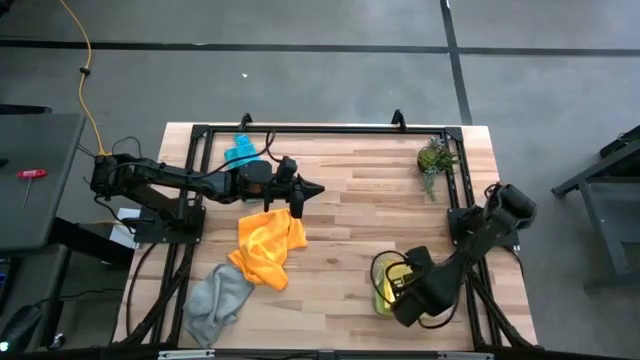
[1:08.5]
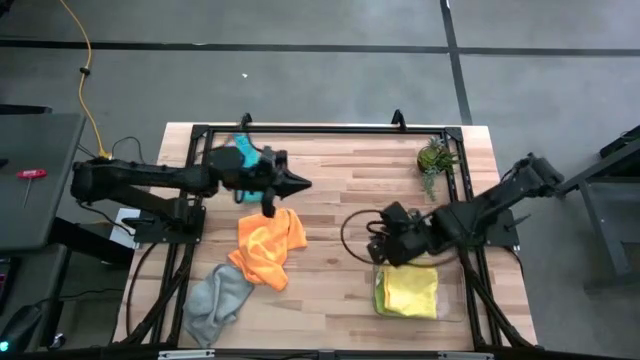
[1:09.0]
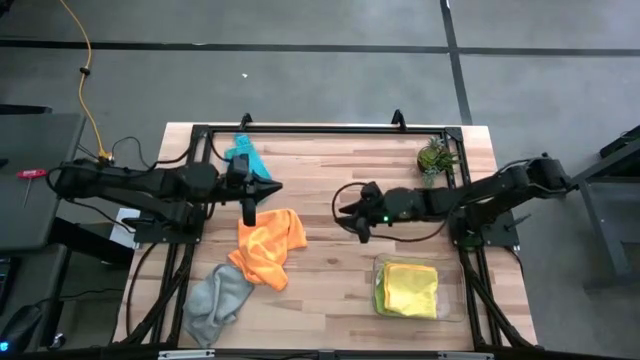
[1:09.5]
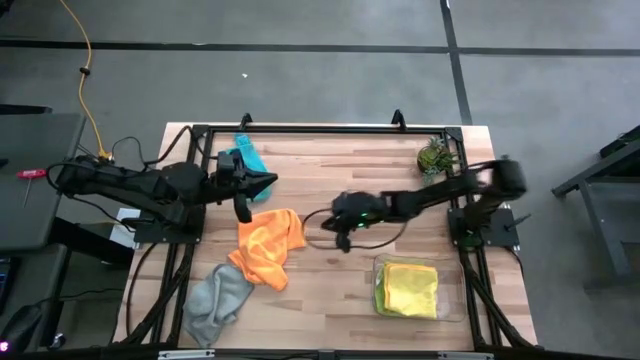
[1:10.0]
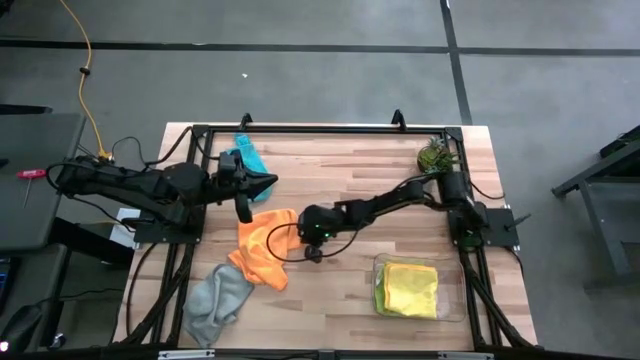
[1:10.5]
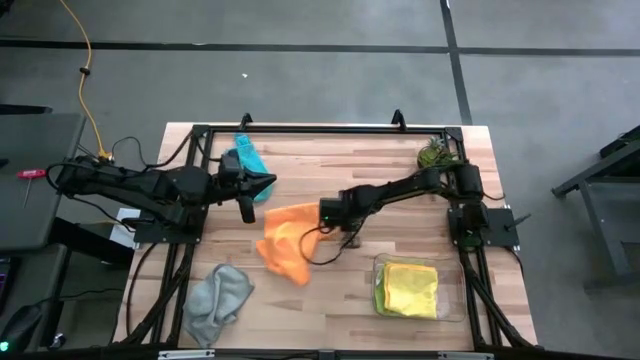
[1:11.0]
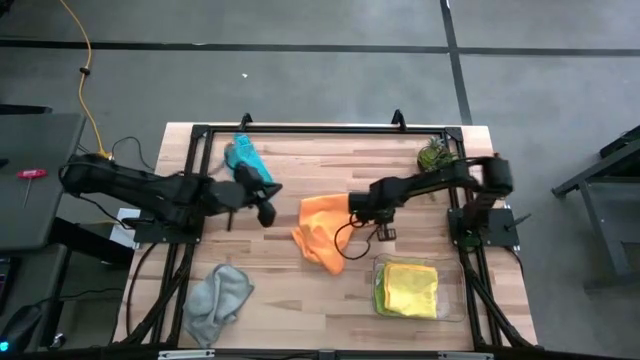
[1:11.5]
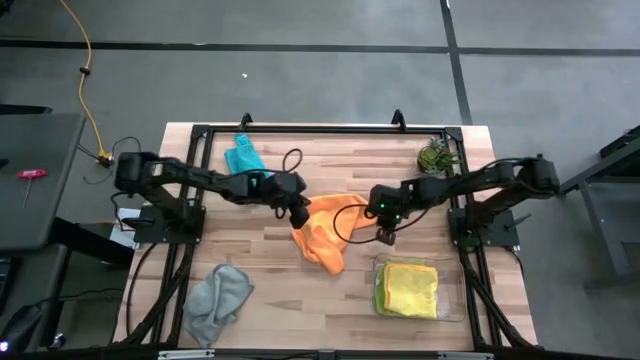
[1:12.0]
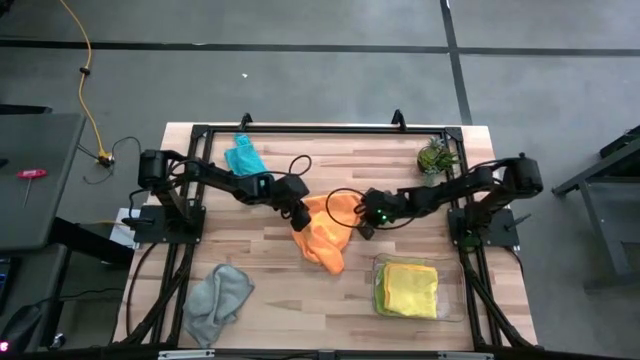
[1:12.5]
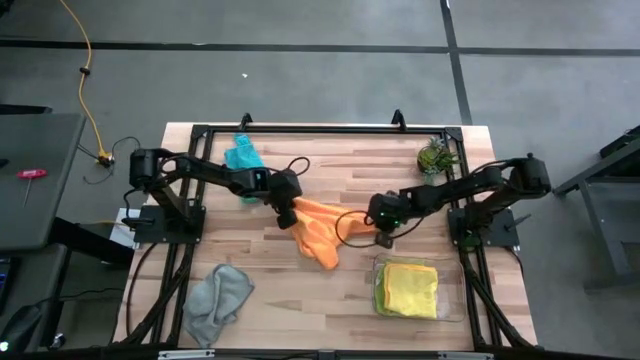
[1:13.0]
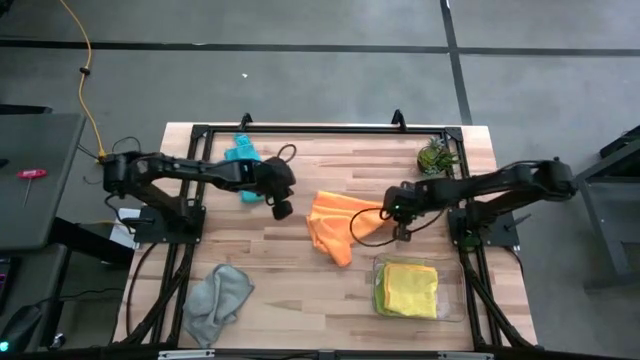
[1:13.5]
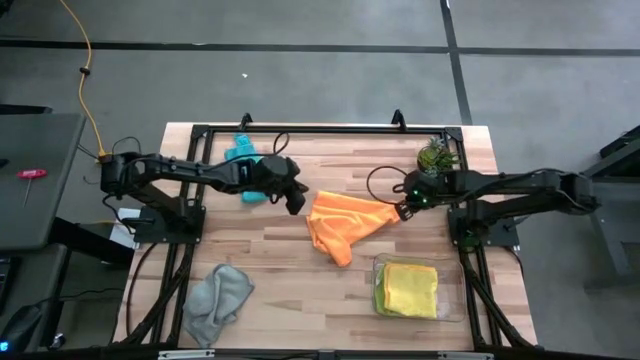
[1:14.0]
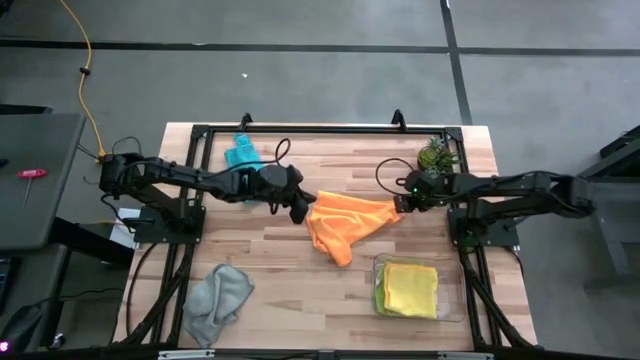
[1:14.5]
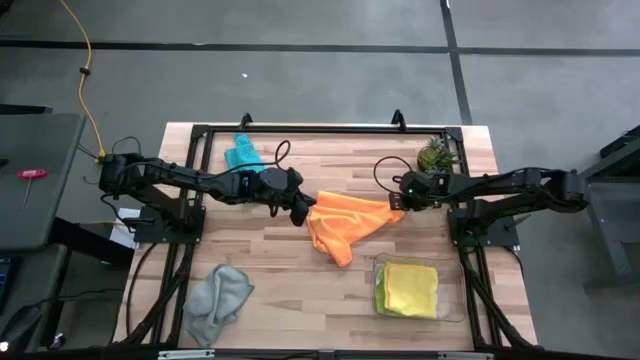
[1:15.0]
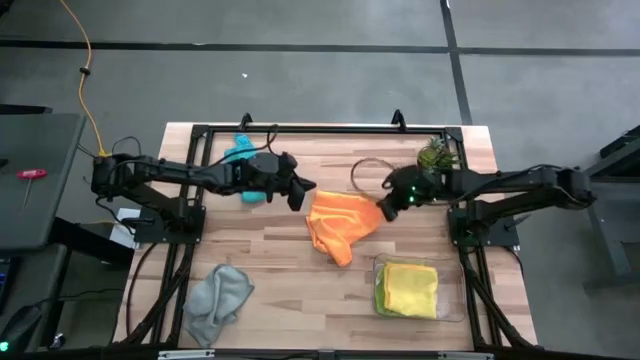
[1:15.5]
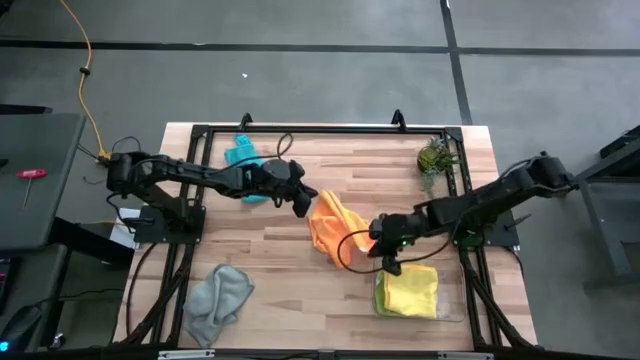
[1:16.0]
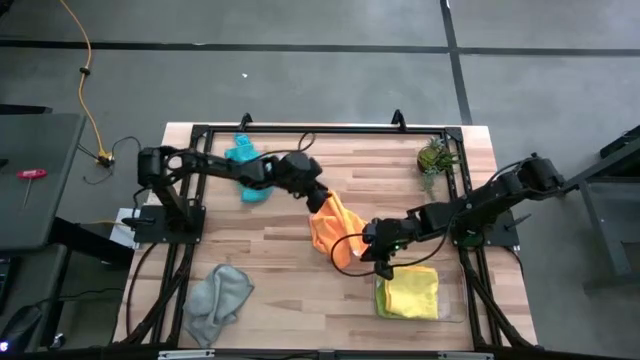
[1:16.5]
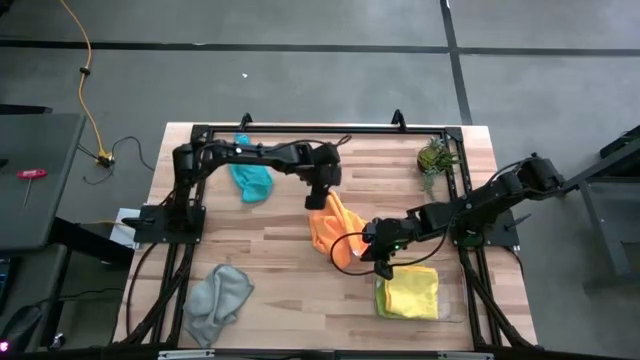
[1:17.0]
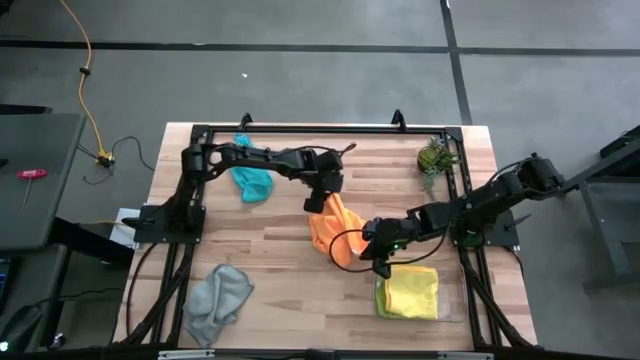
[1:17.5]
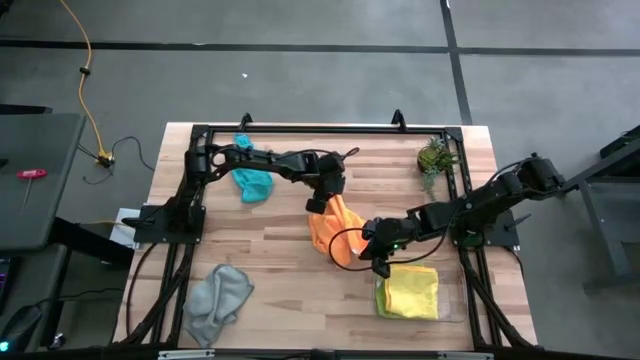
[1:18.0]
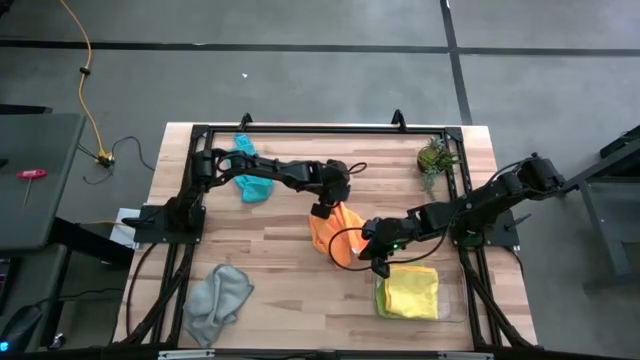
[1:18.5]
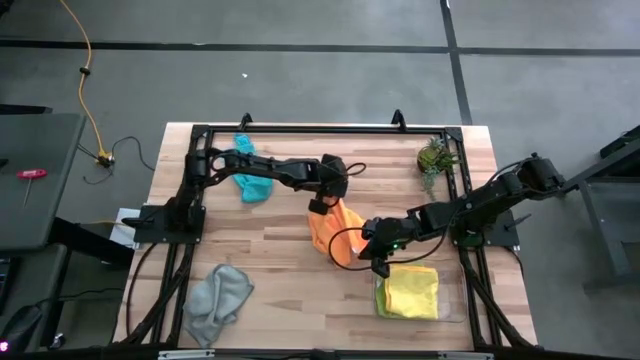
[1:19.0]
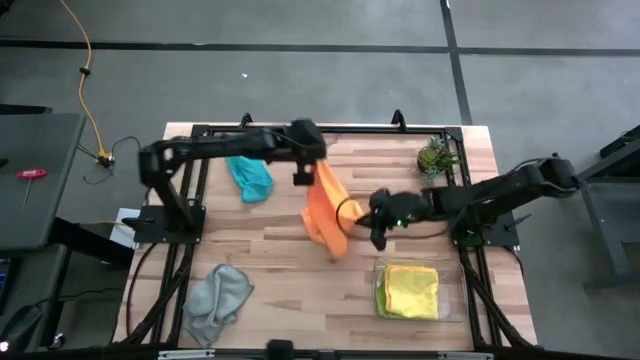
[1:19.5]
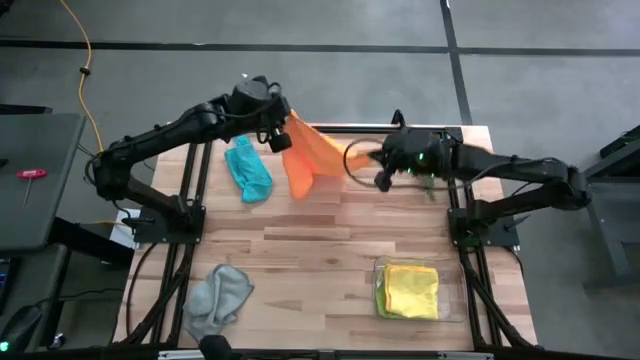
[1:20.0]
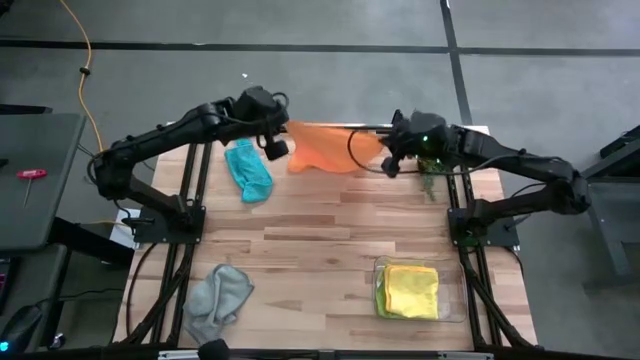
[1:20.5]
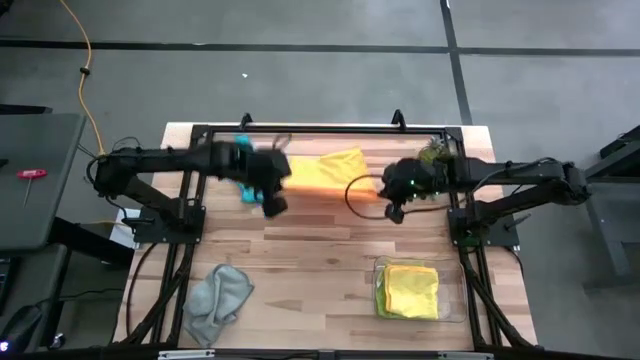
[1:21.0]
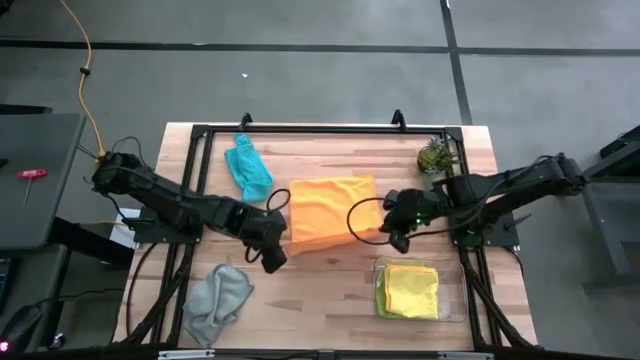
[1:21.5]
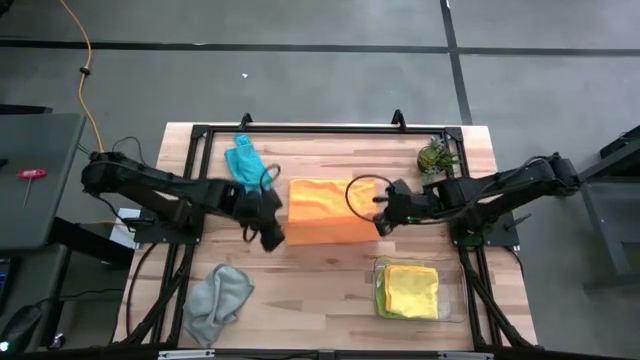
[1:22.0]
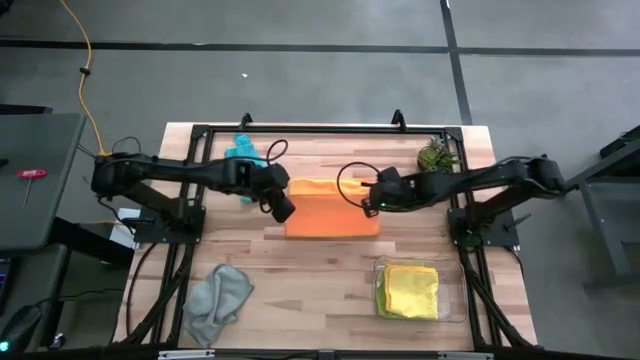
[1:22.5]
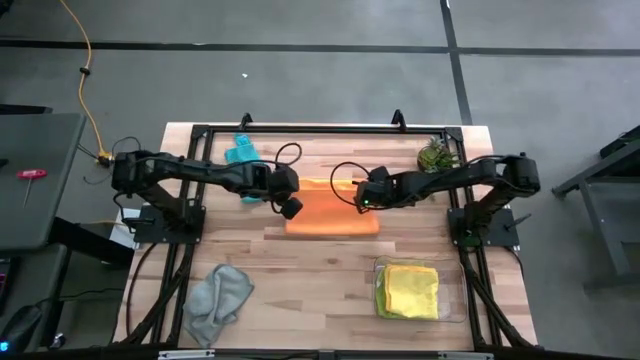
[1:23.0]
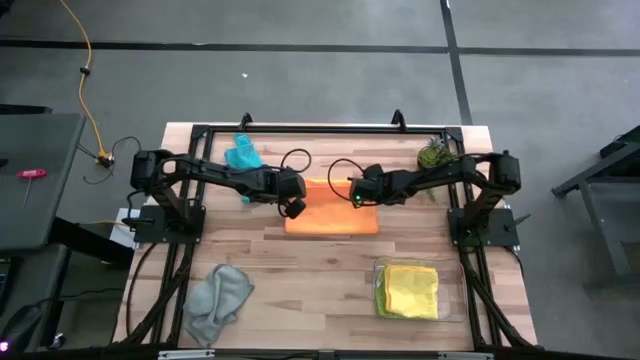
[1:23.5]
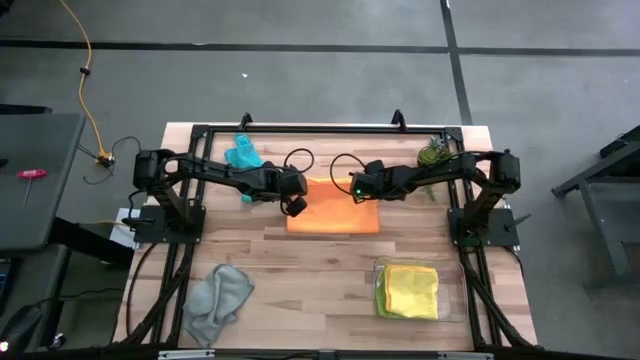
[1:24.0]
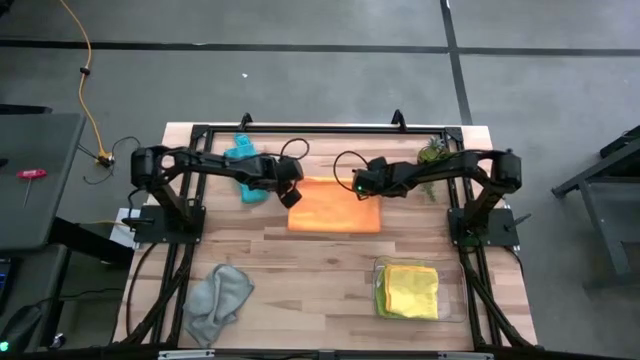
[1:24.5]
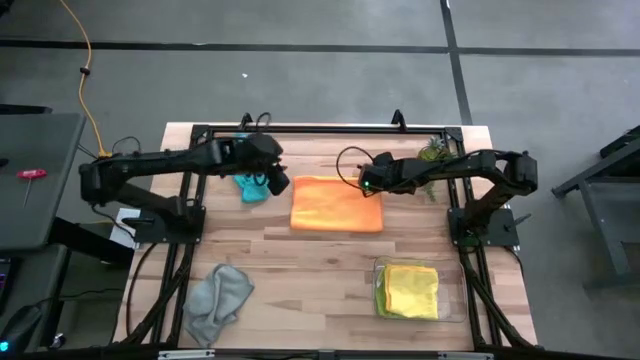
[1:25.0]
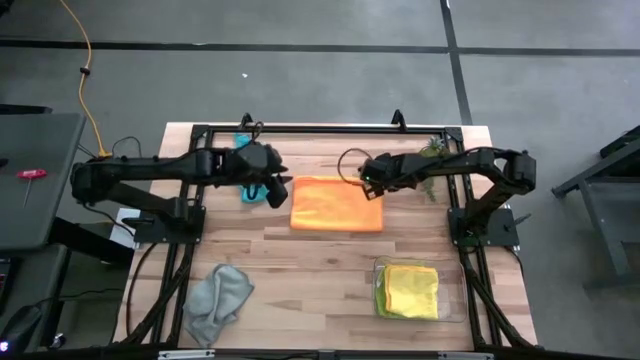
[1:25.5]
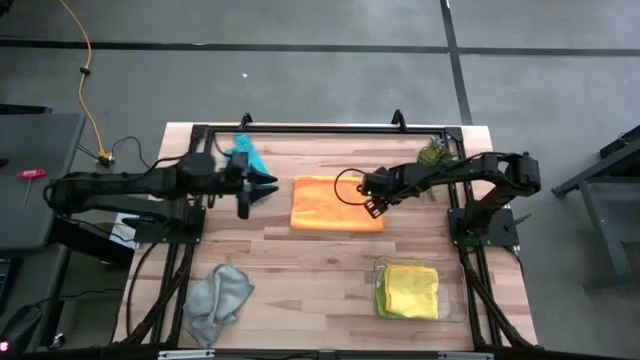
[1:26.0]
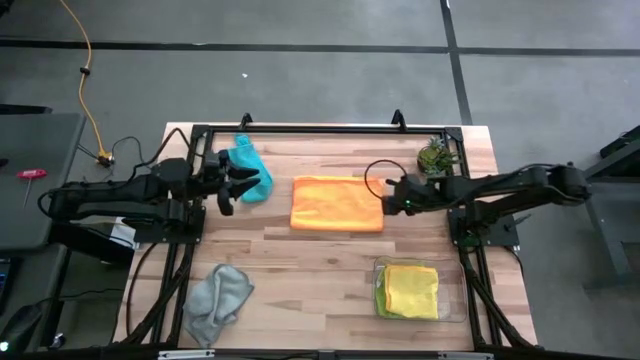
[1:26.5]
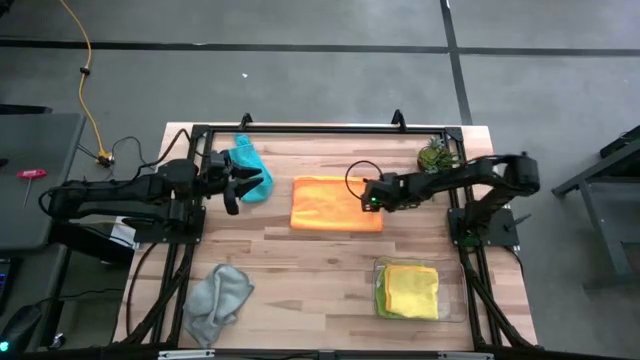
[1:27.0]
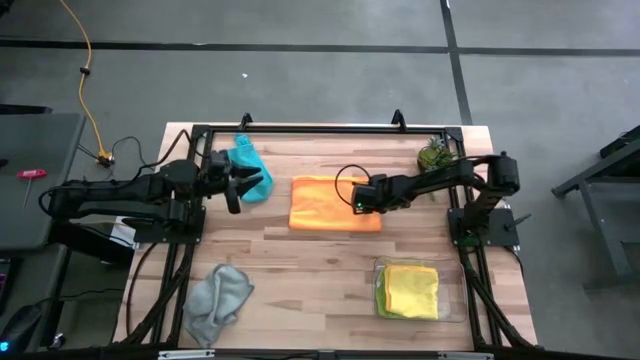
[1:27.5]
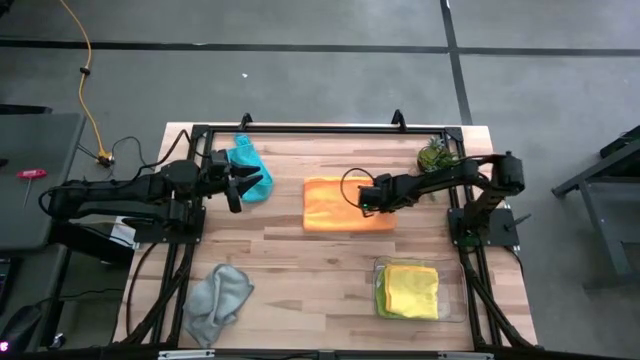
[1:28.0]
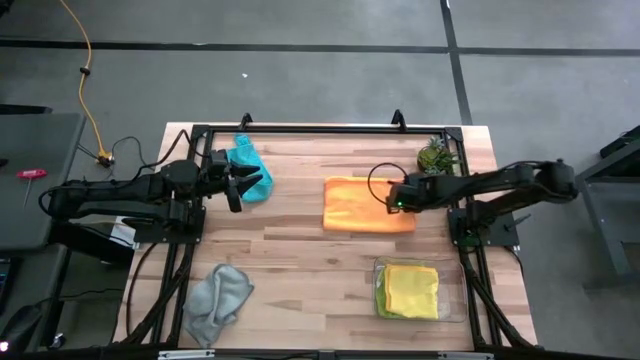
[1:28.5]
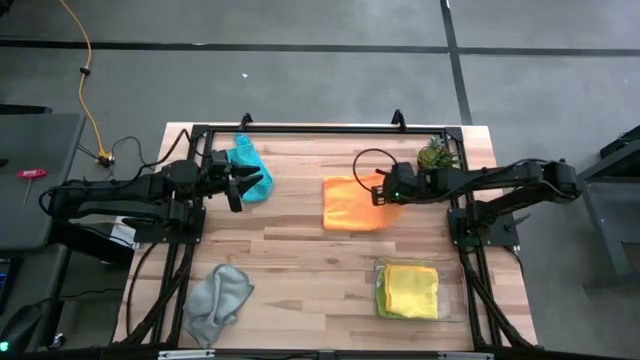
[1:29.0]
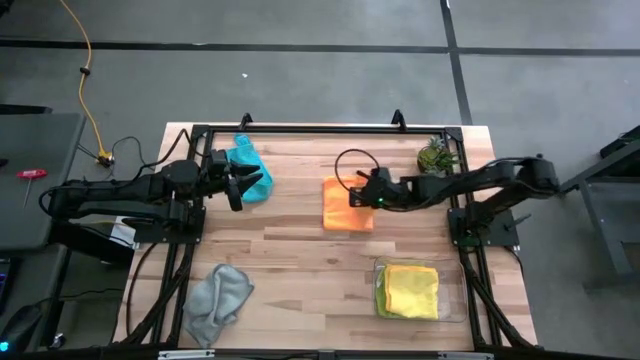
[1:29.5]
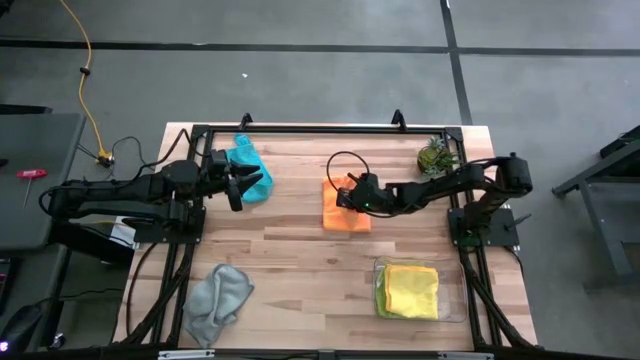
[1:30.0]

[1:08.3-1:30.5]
Task: Fold microfiber towels
Fold the orange microfiber cloth
